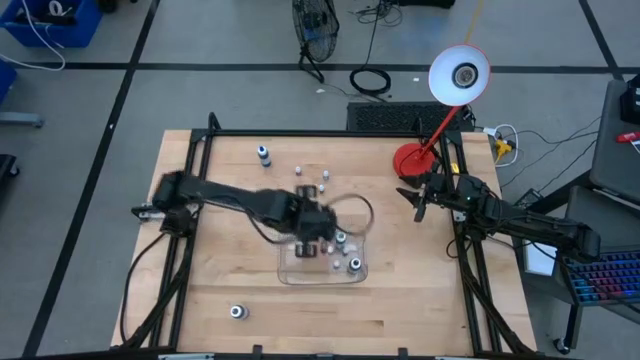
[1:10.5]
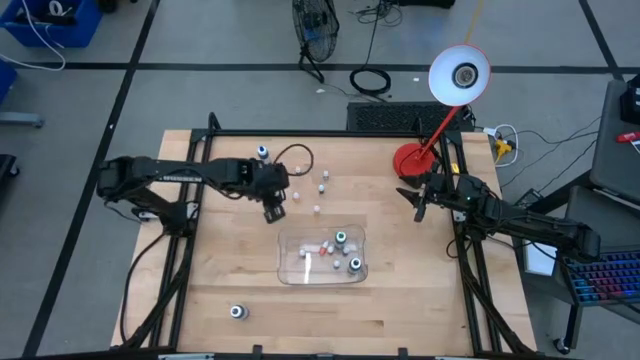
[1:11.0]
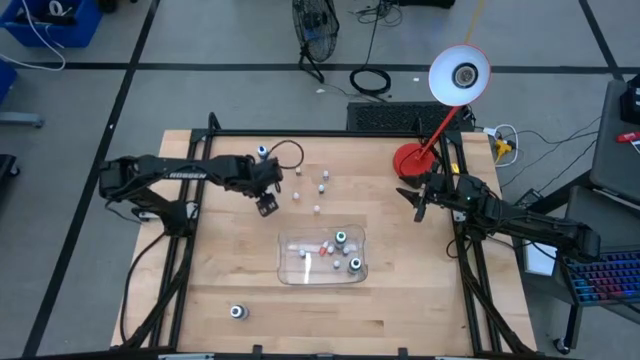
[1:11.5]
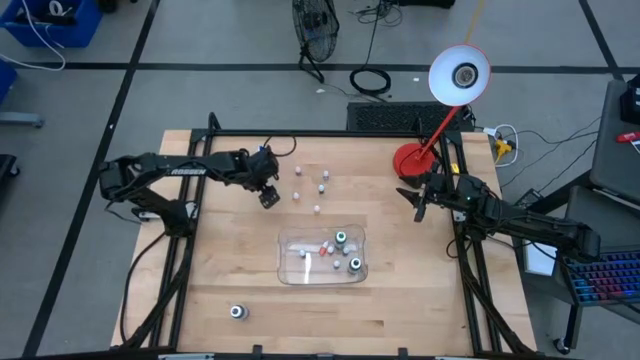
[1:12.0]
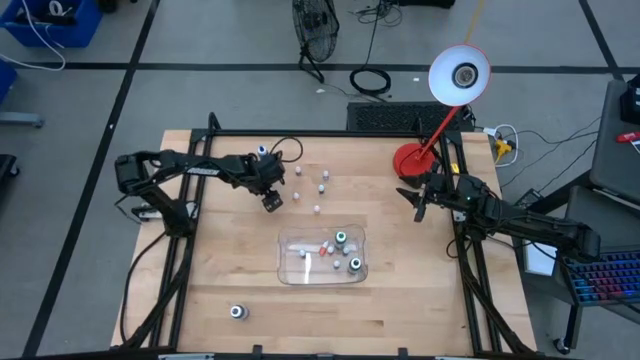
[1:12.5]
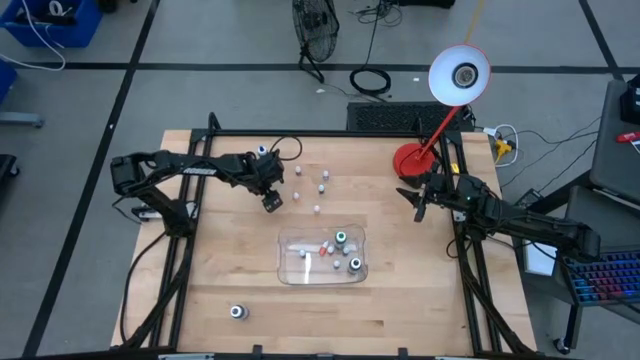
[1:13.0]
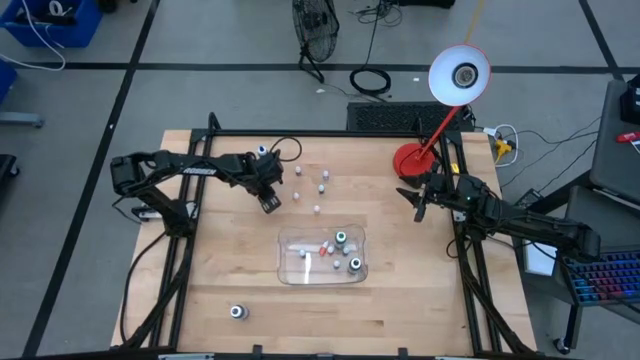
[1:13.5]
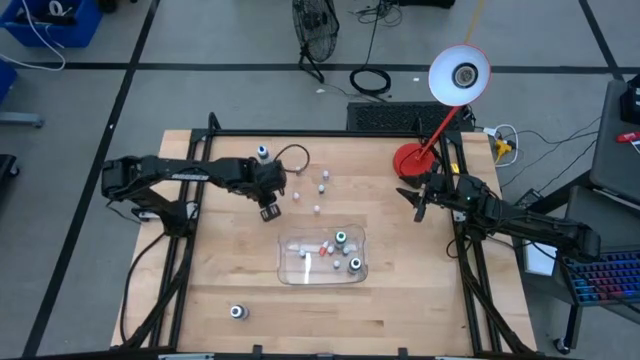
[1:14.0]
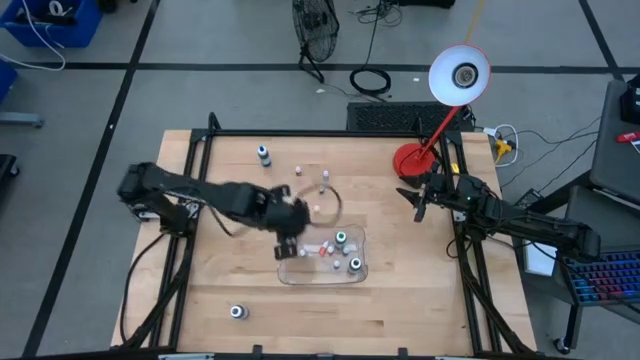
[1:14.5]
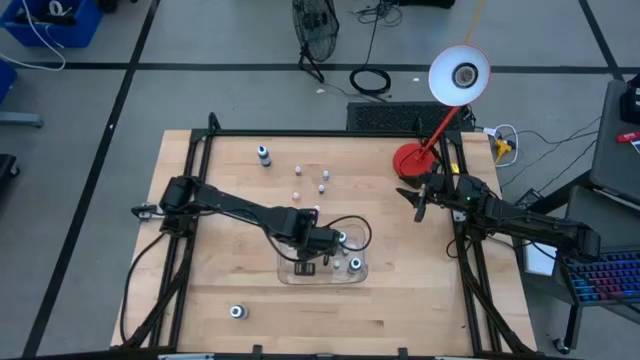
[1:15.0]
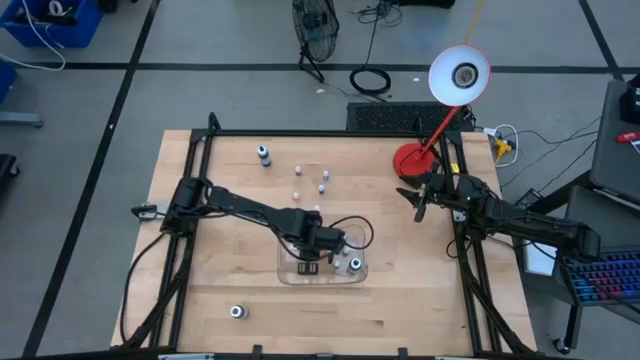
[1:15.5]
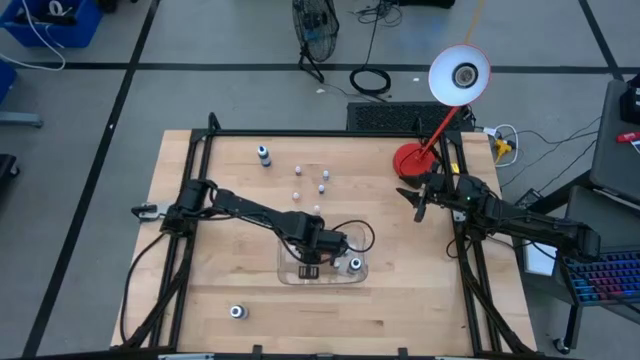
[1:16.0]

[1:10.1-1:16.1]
Task: Pick & Place food coloring
Put the small red food coloring bottle into the transparent bin

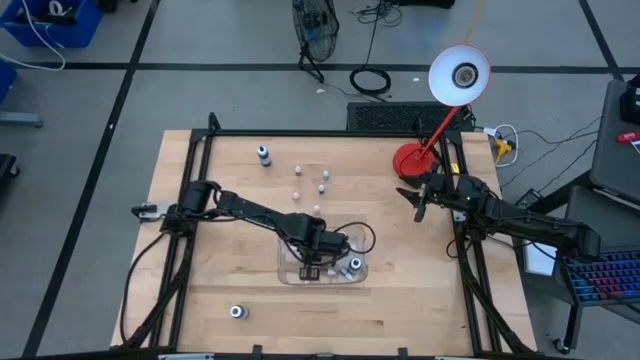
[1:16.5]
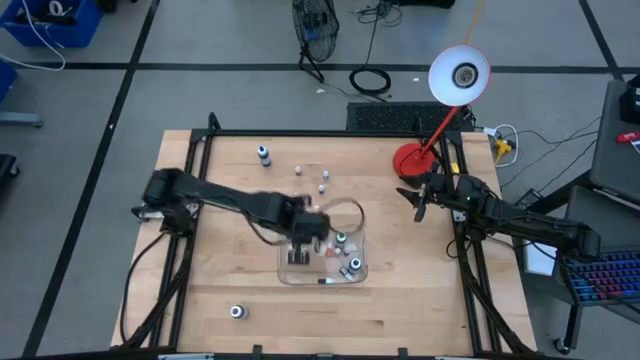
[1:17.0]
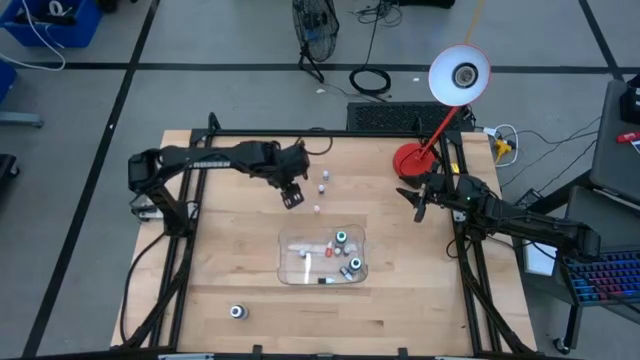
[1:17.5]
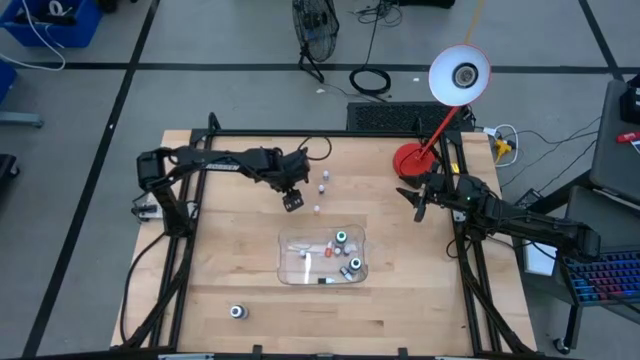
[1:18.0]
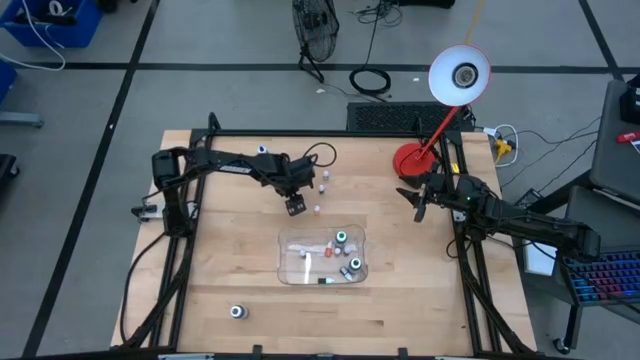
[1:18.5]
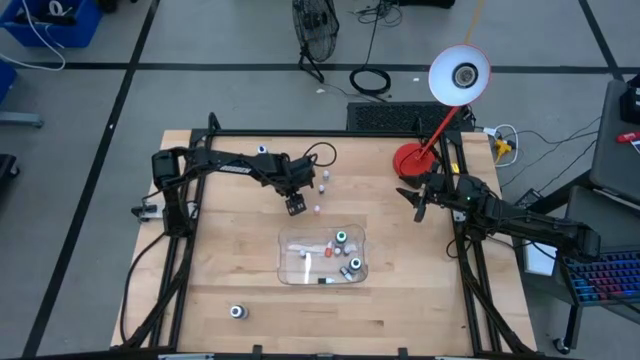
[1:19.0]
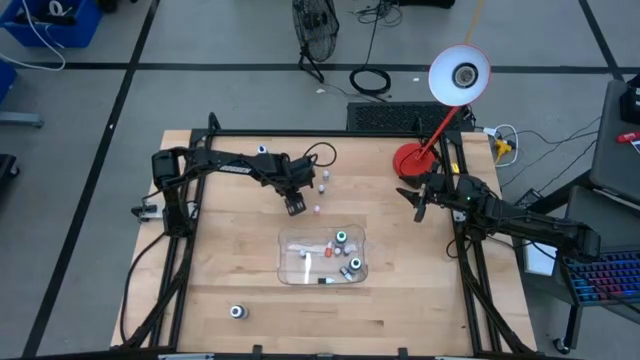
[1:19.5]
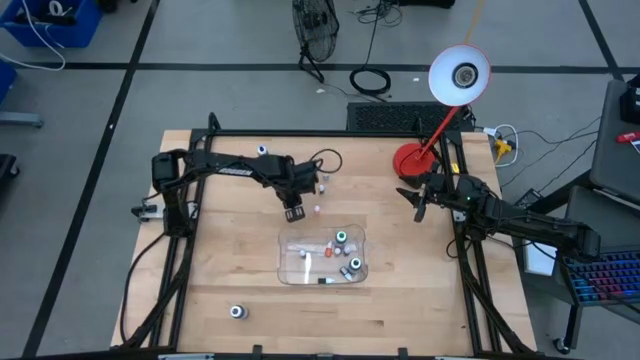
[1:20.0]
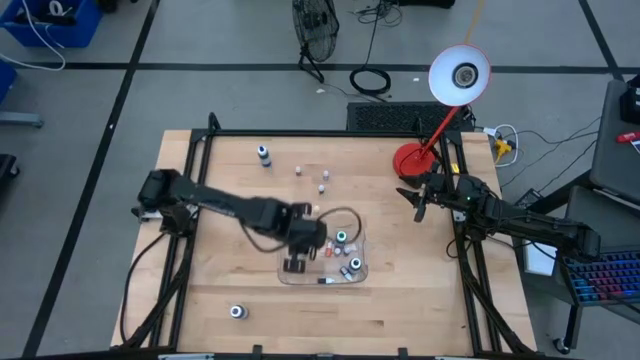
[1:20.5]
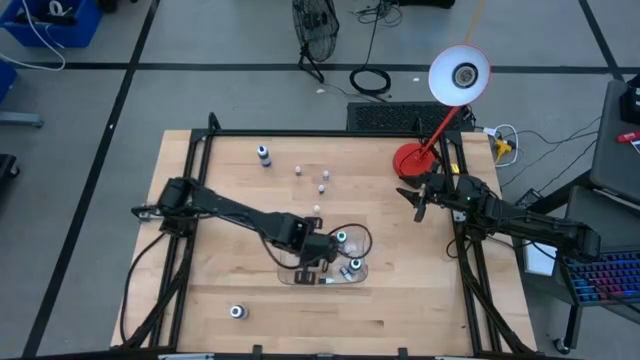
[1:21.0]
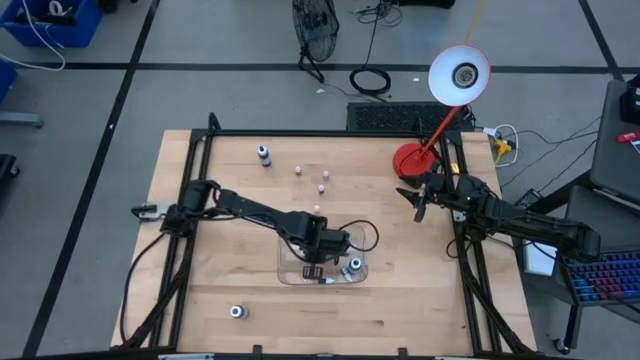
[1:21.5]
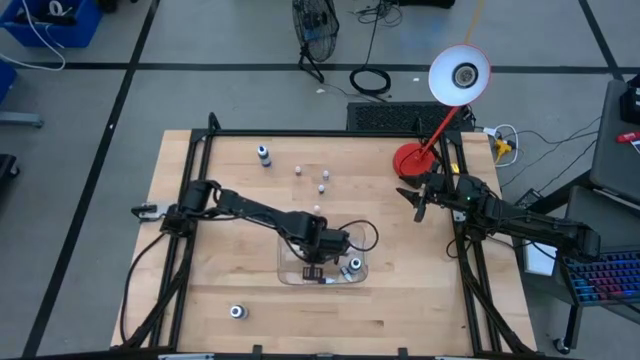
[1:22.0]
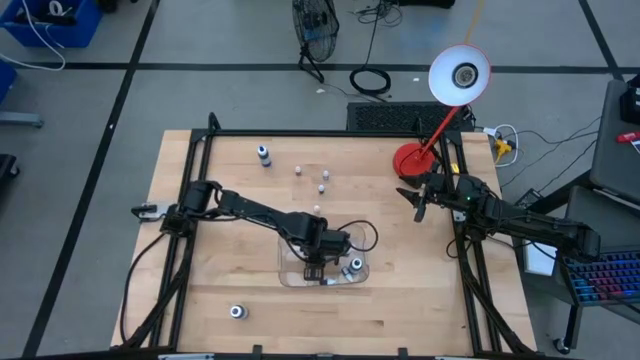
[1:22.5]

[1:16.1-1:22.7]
Put the small orange food coloring bottle into the transparent bin

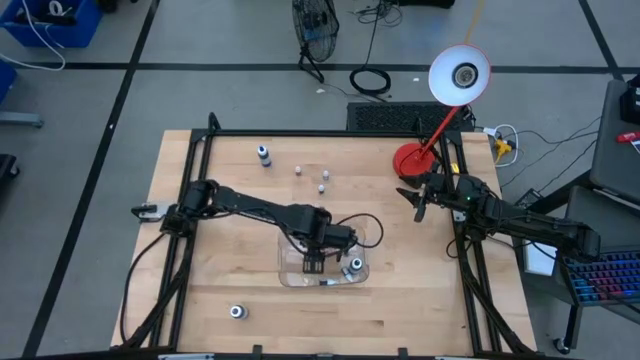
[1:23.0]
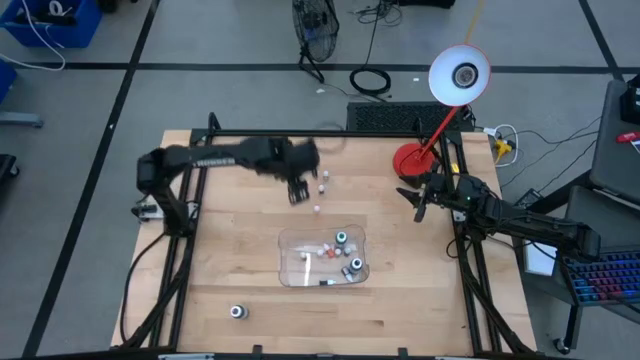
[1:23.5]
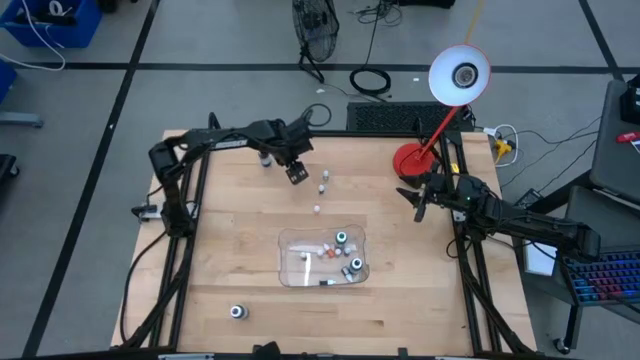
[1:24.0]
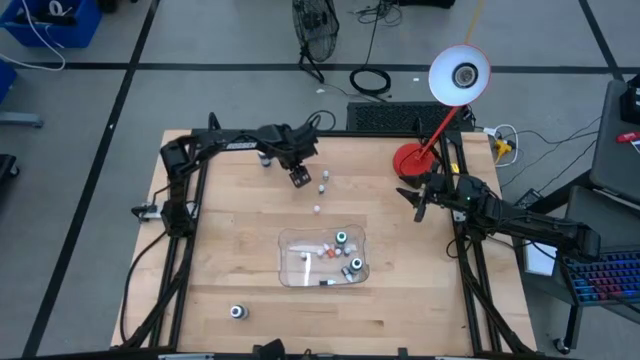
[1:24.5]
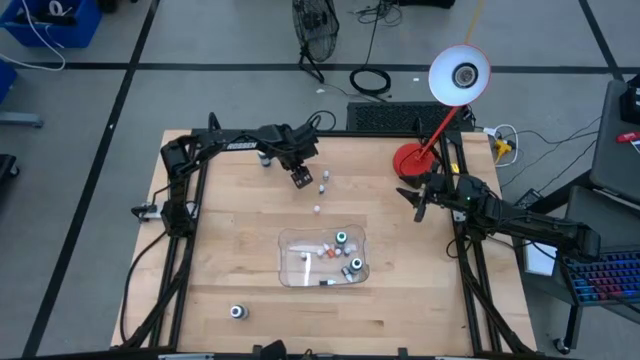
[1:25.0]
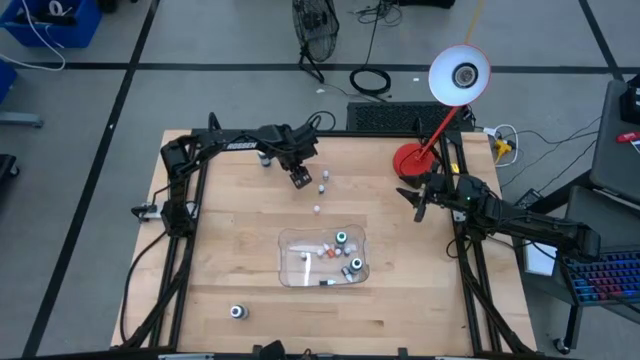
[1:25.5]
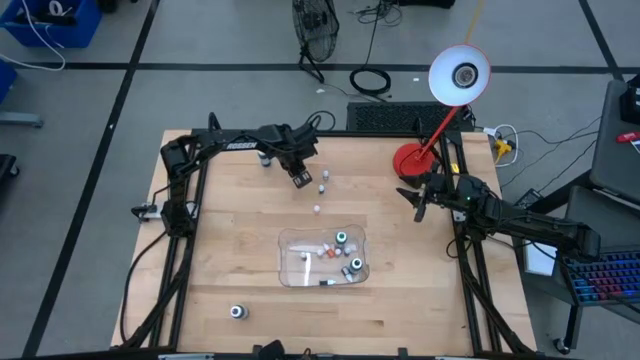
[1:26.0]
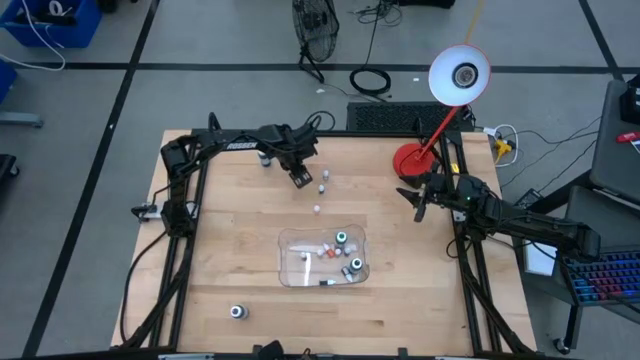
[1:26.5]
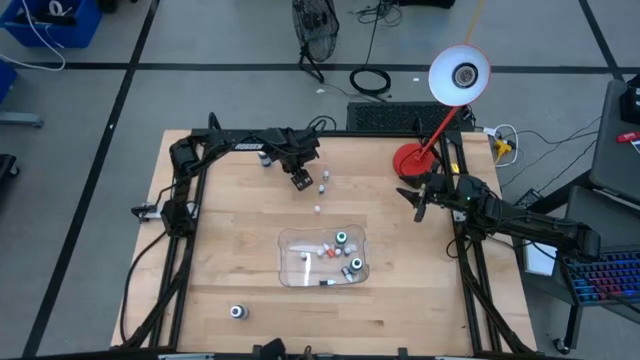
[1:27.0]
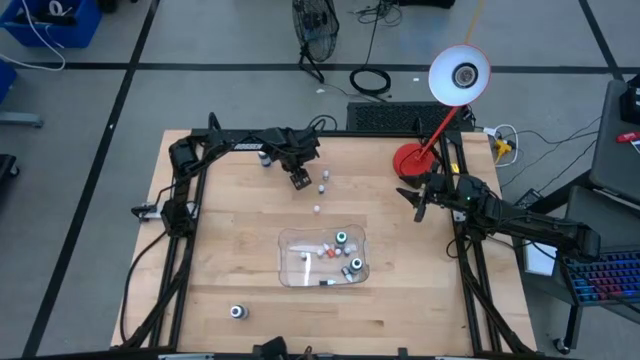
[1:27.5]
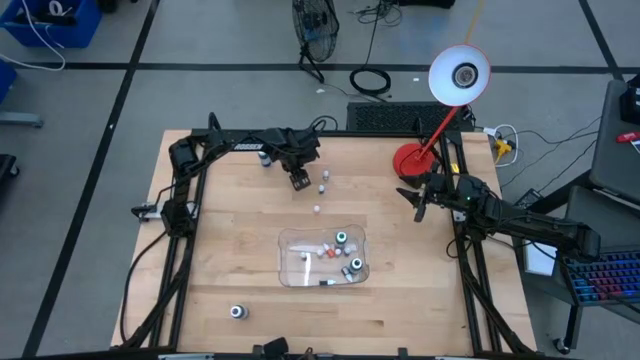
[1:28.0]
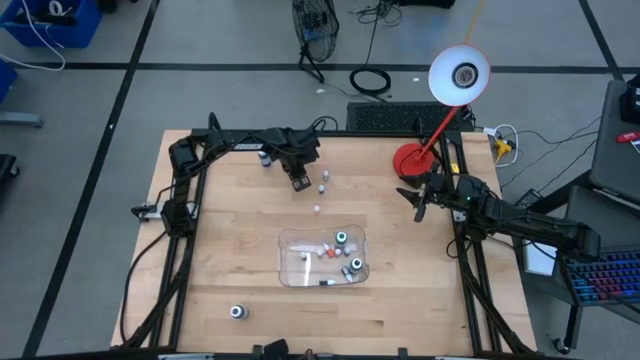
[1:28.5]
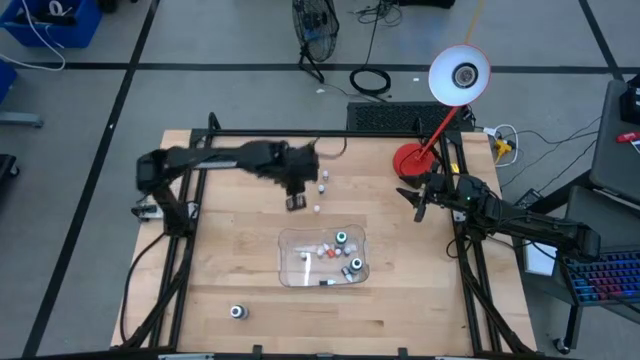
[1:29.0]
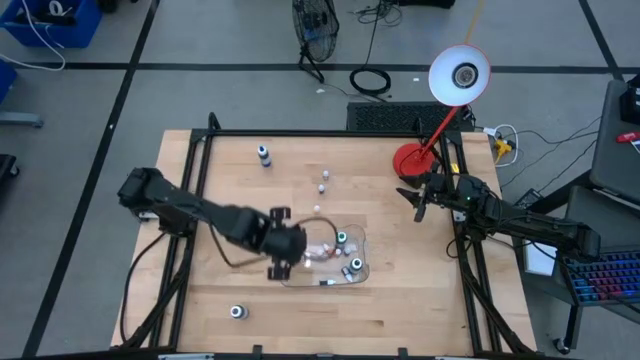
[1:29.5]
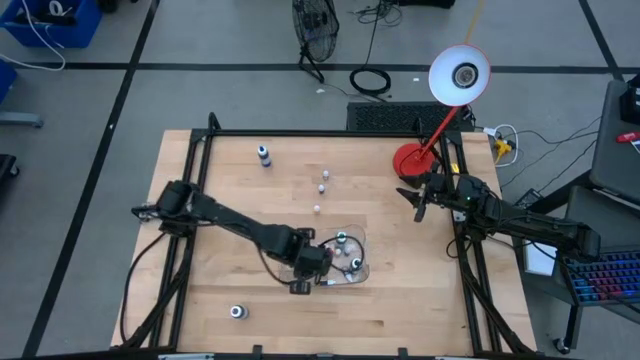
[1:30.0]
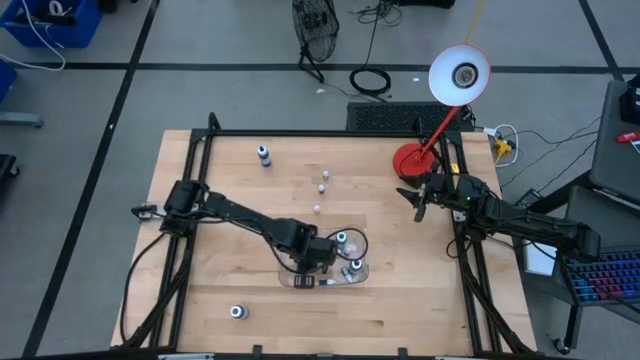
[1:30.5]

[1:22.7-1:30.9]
Put the small red food coloring bottle into the transparent bin

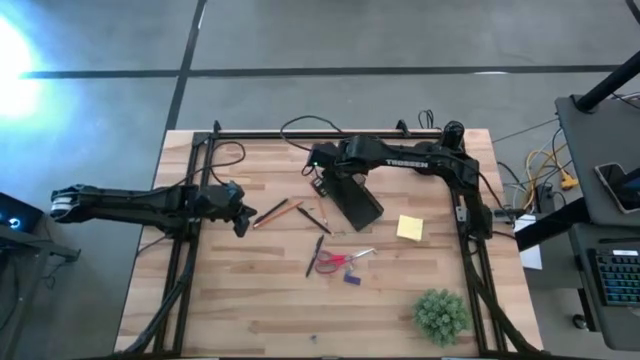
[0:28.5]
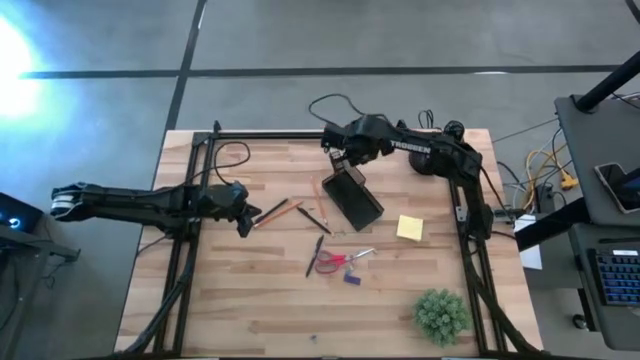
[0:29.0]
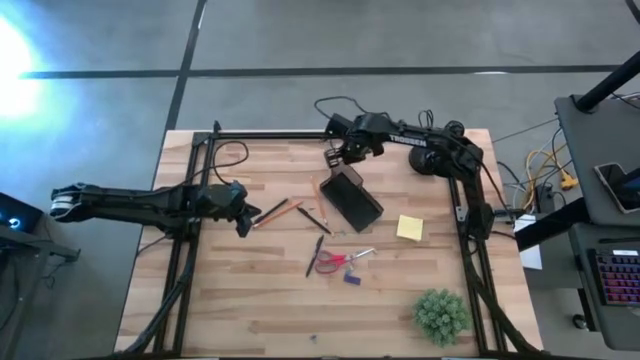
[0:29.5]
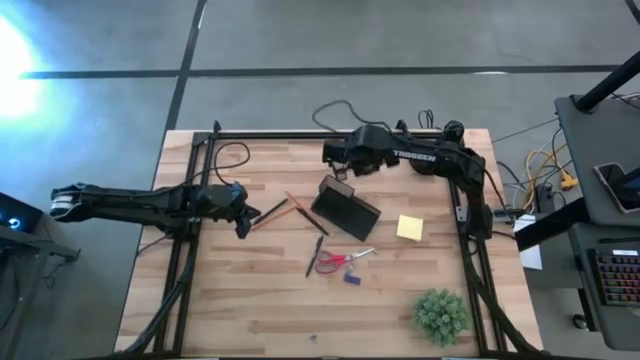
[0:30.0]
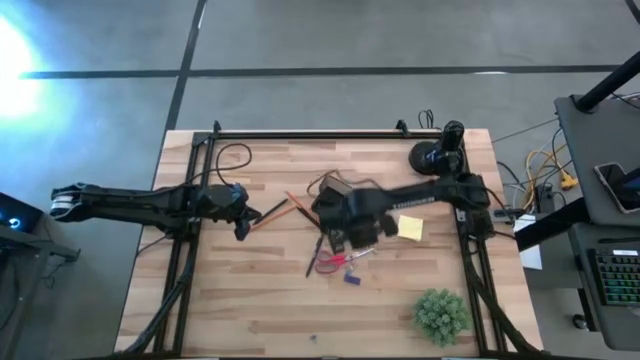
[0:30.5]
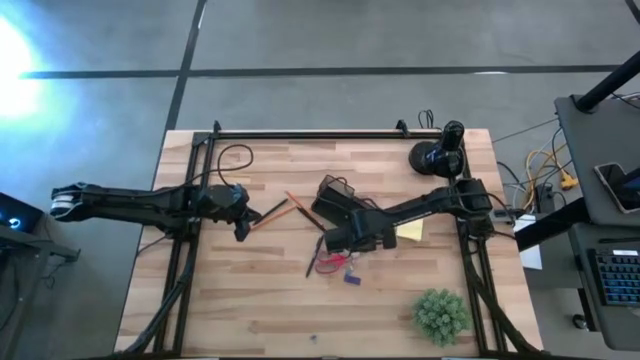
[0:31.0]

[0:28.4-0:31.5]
Task: Pick and place office supplies into organizer
Adjust the desk organizer on the table
